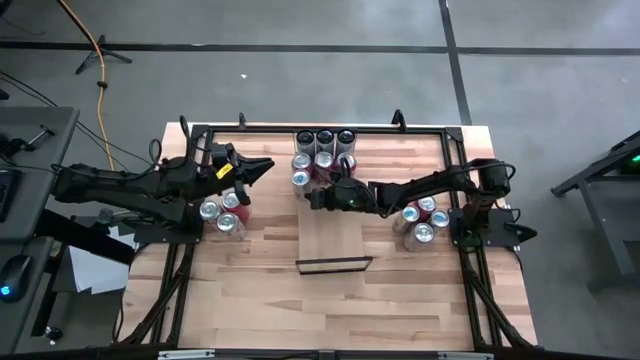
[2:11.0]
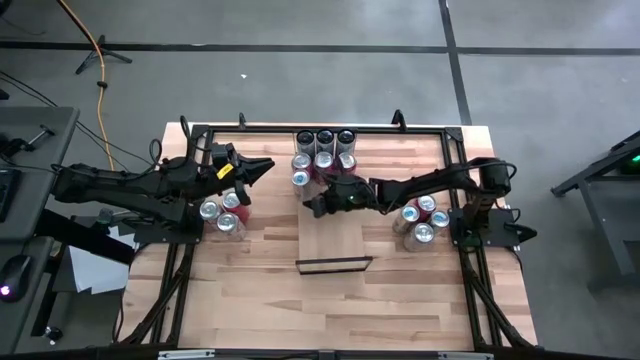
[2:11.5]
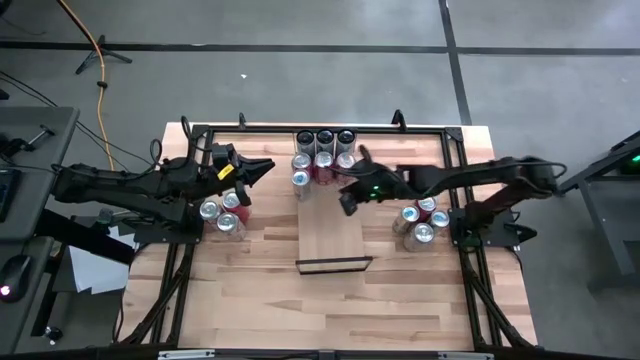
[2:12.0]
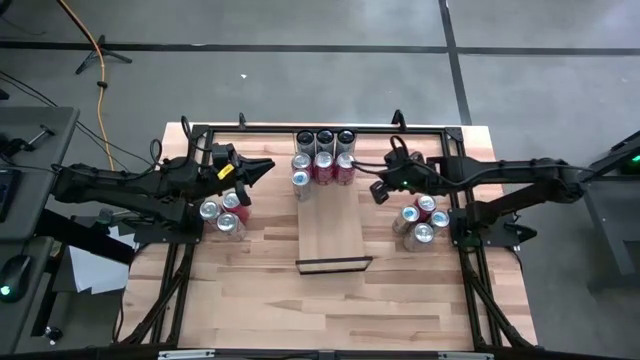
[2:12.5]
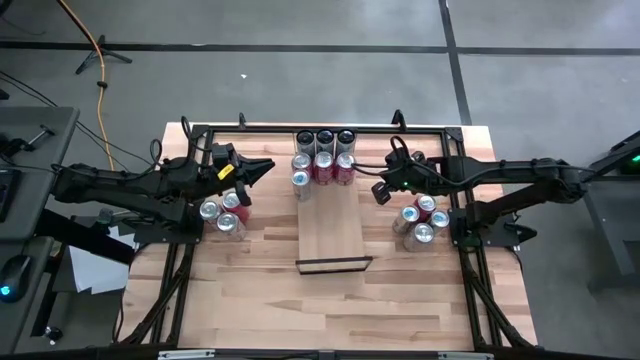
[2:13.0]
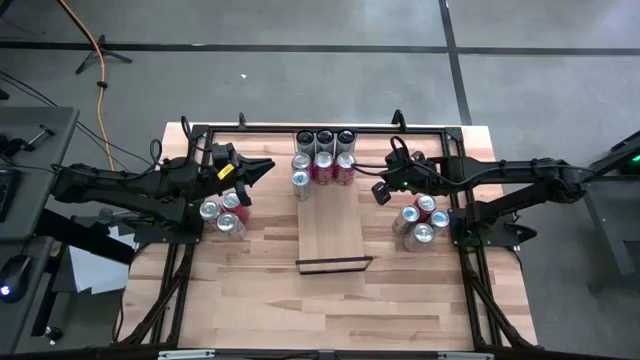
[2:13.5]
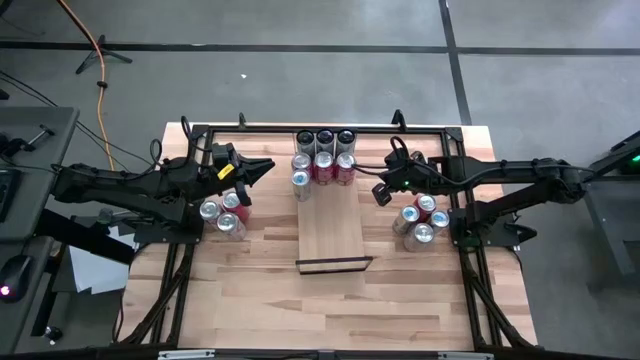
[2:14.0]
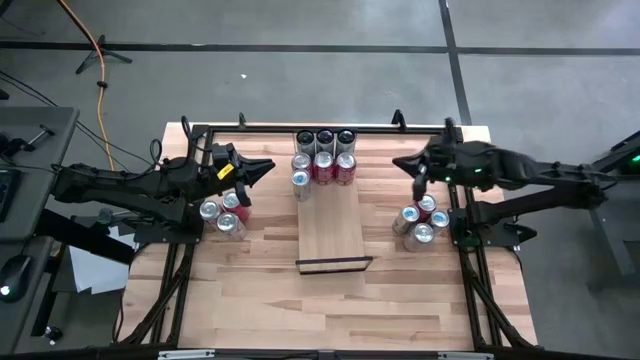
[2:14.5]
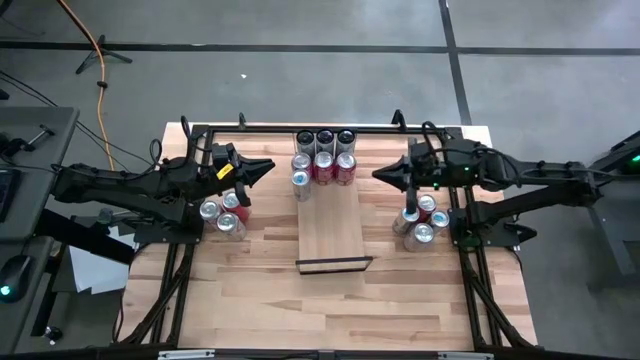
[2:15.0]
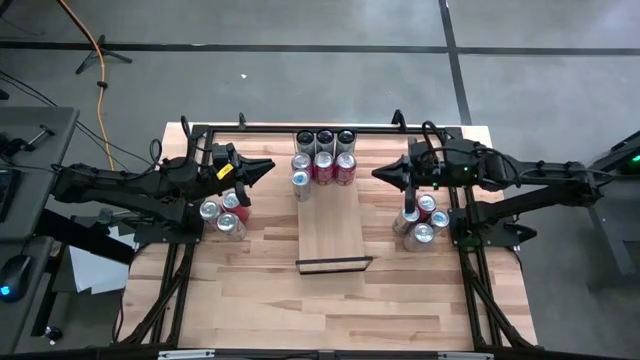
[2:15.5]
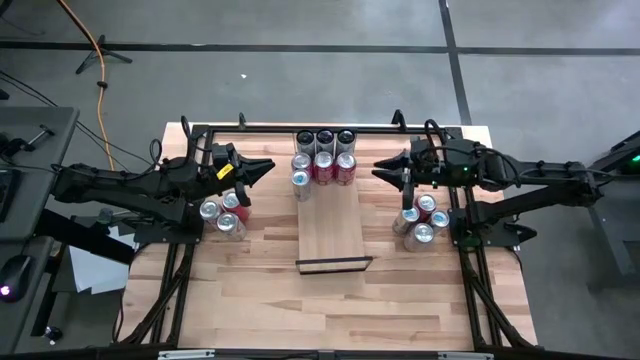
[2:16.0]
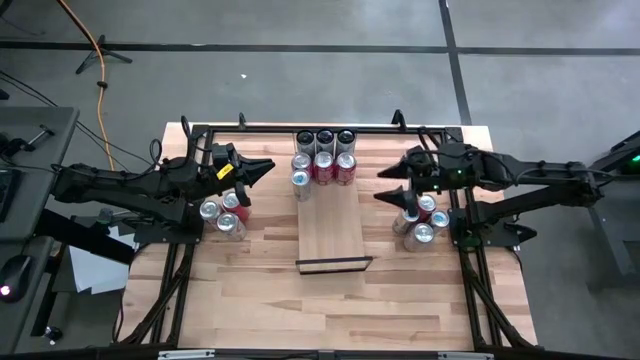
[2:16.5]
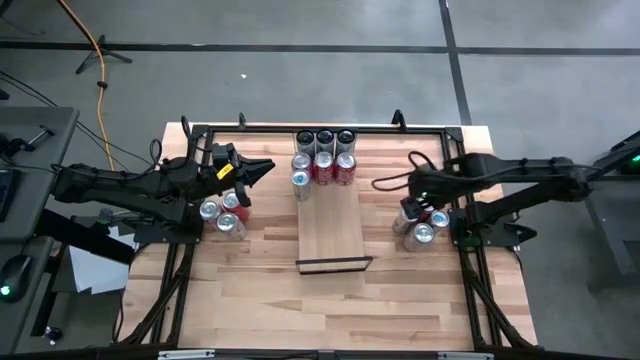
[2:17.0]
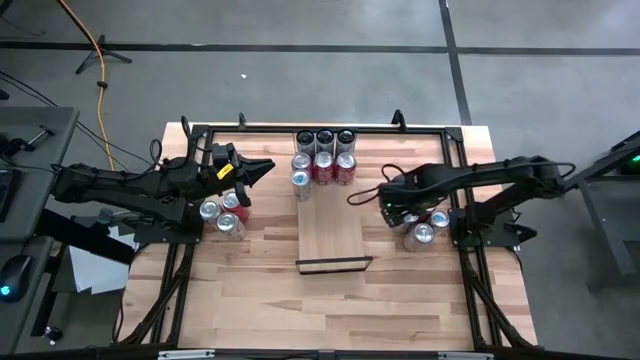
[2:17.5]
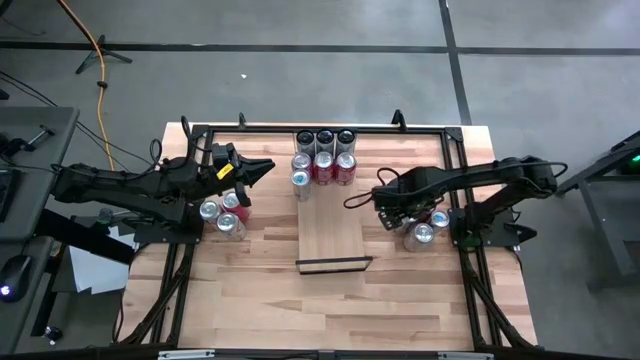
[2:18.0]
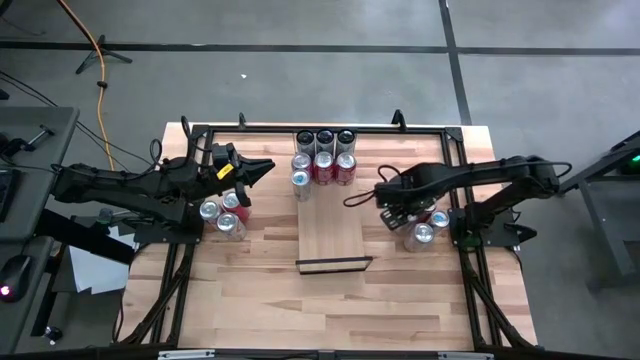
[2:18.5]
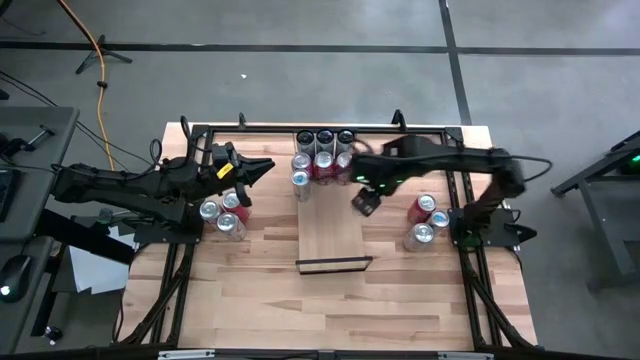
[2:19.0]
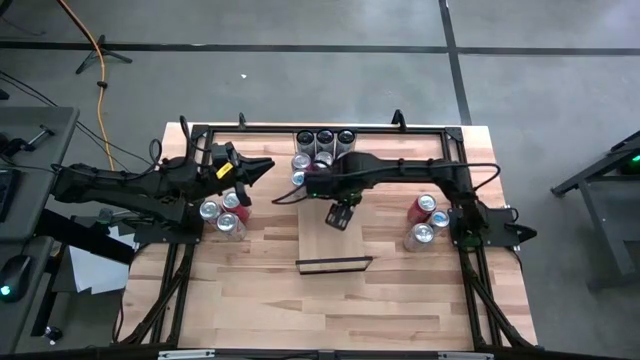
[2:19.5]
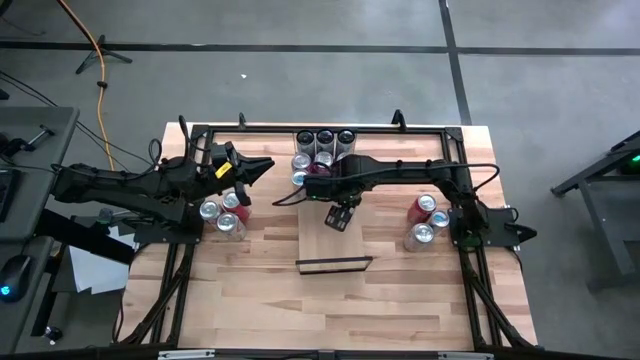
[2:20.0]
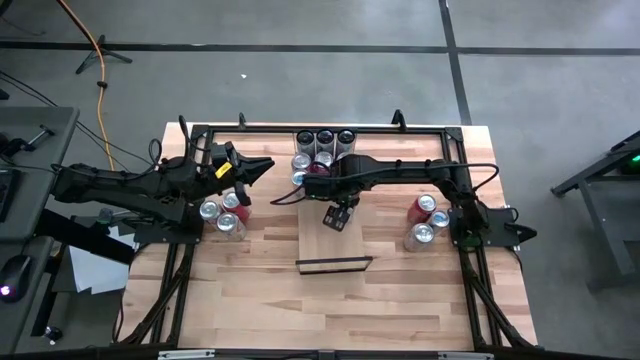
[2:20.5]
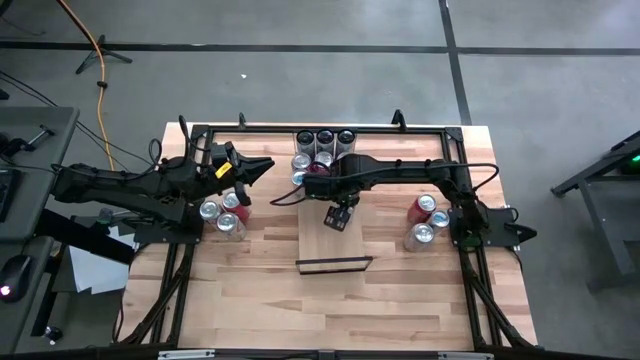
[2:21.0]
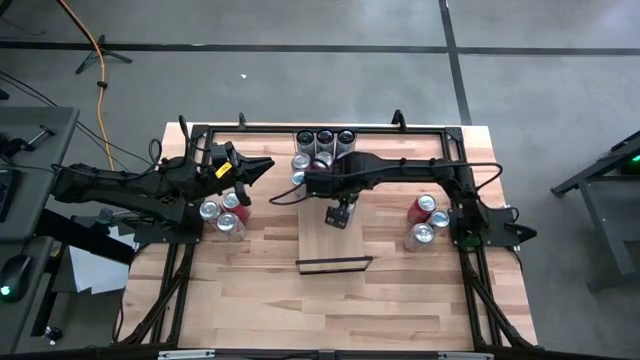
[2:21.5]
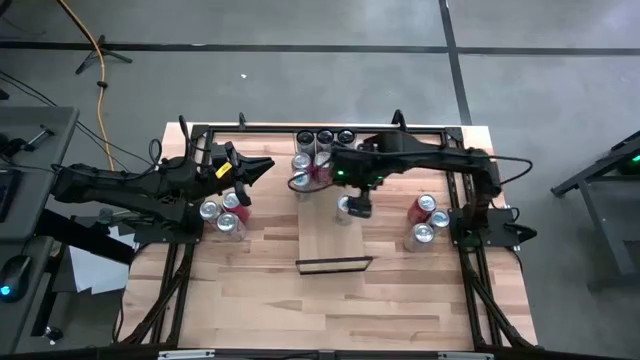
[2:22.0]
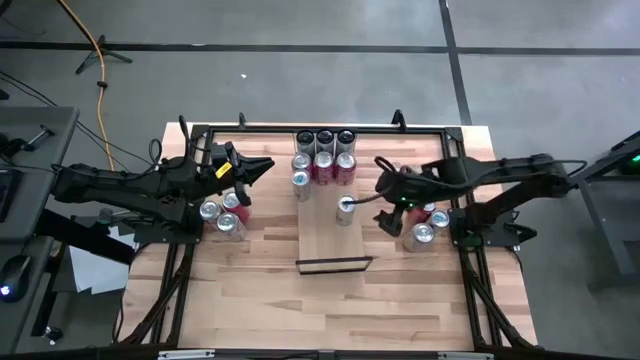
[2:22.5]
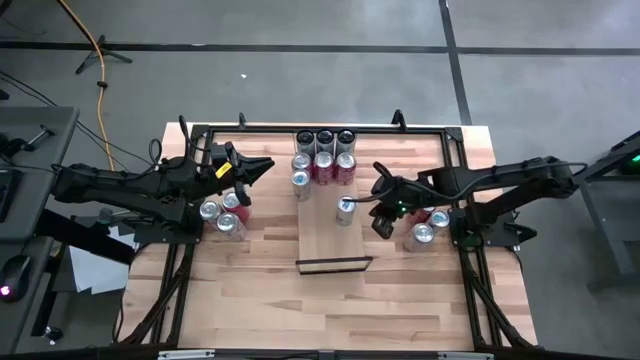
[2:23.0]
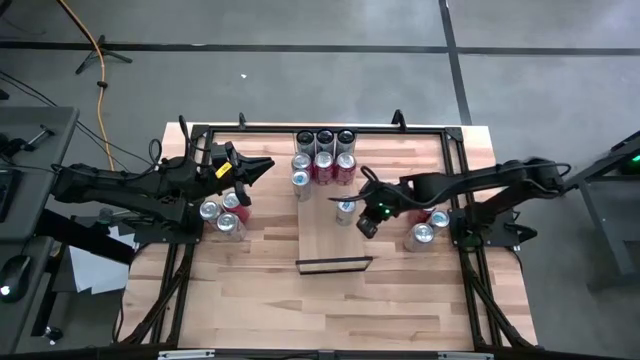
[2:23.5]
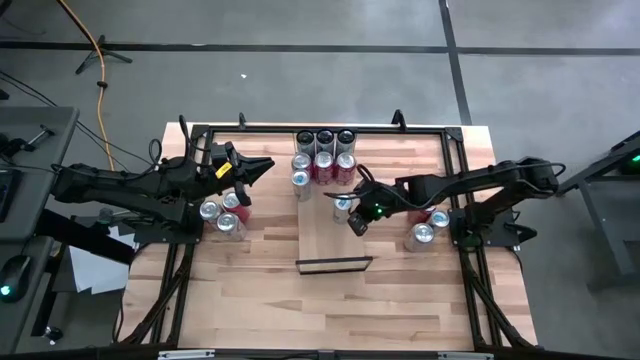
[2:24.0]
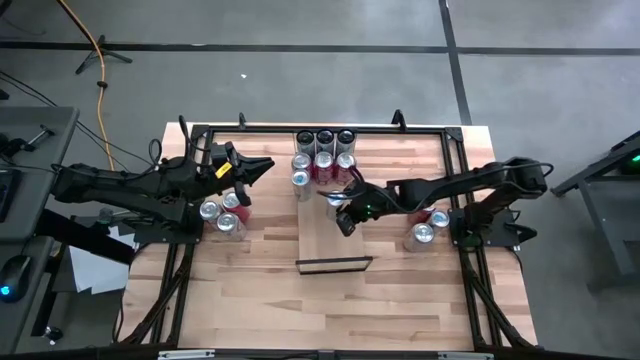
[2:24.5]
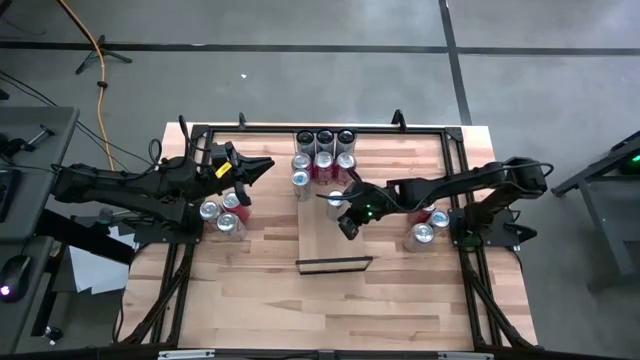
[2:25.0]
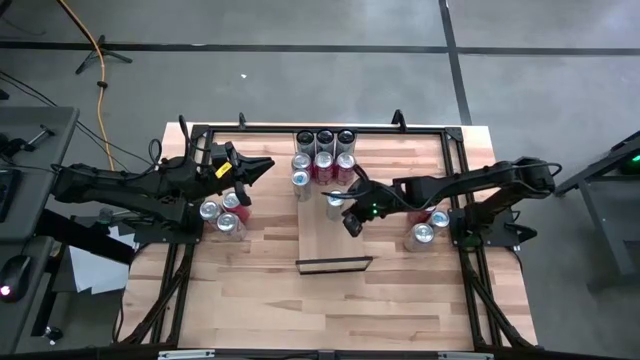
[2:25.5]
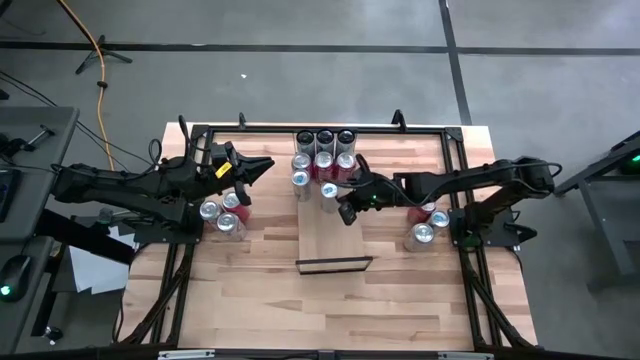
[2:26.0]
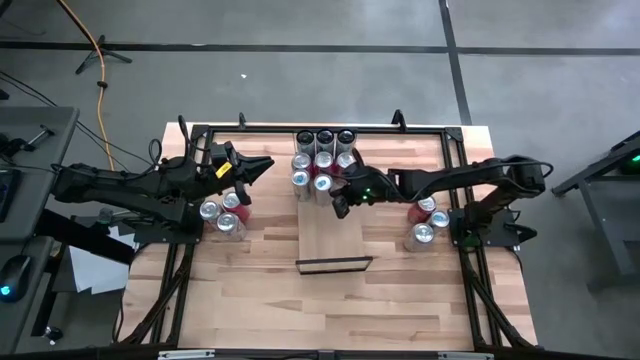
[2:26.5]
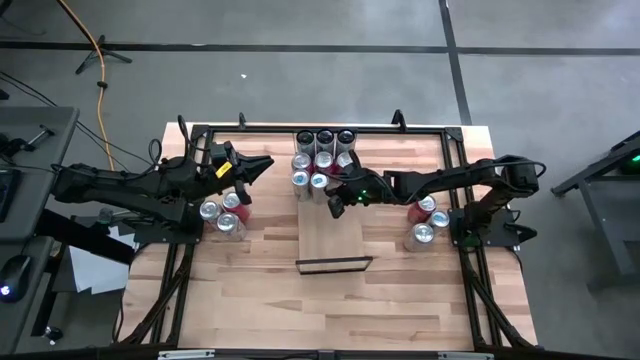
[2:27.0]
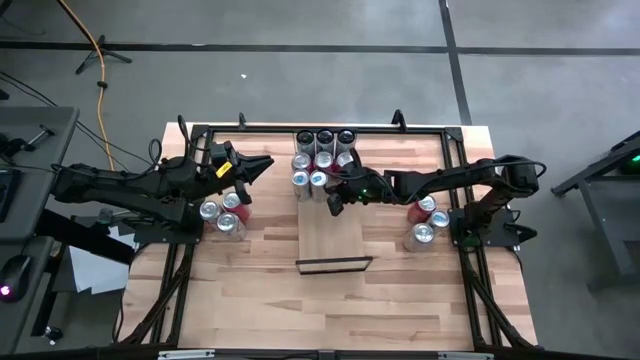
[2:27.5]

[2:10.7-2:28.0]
Task: Place canned beverage on shelf
Put the left blue soda can on the shelf aligned with the other blue soda cans

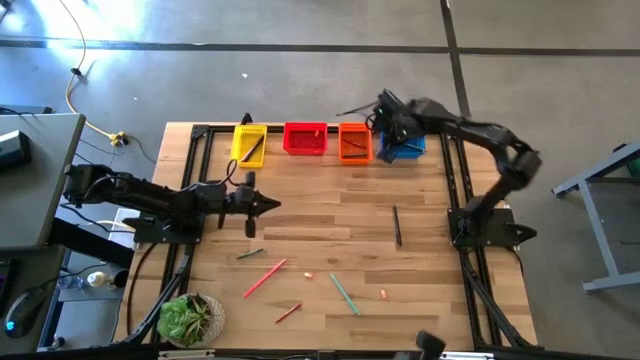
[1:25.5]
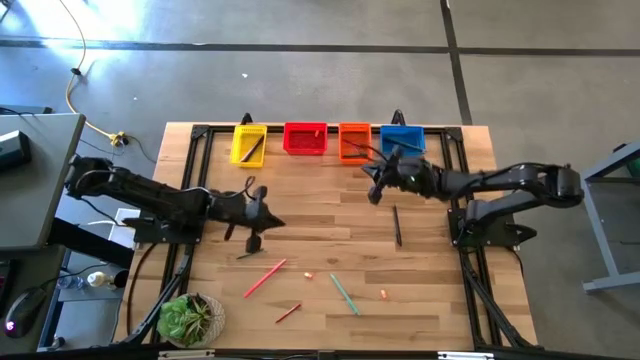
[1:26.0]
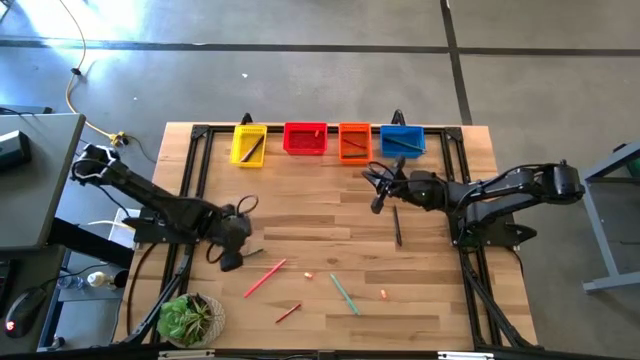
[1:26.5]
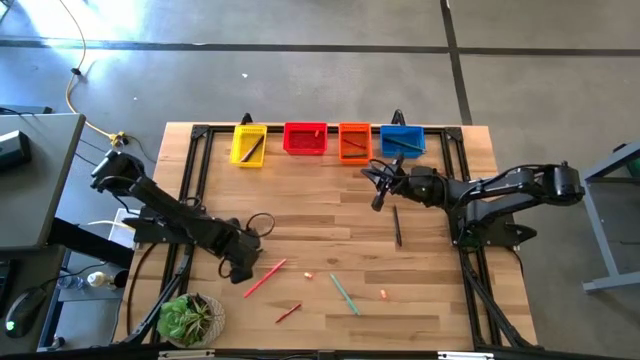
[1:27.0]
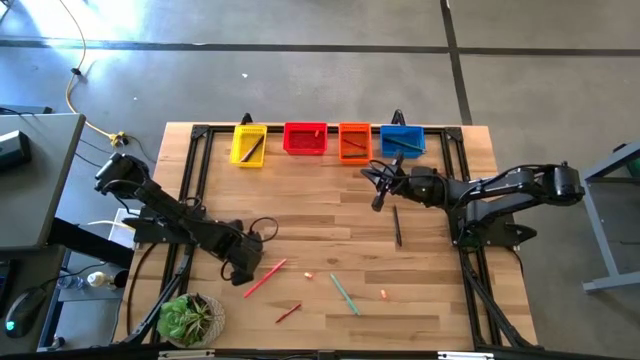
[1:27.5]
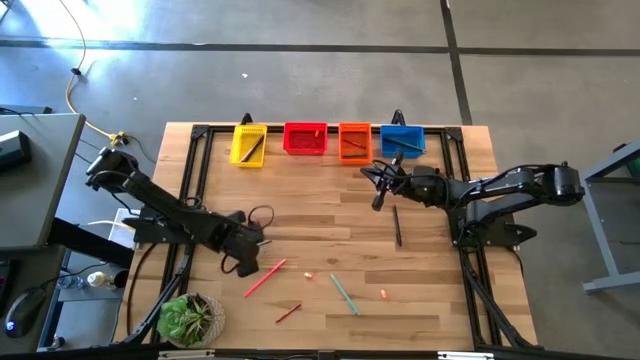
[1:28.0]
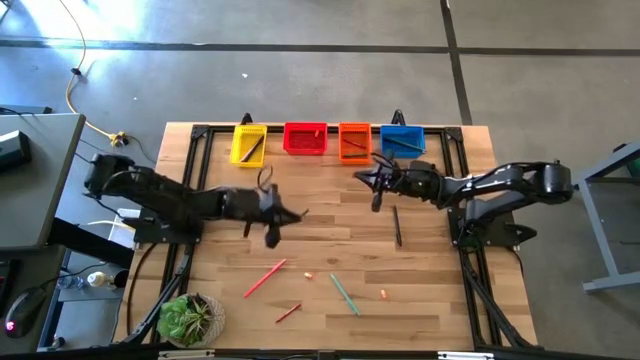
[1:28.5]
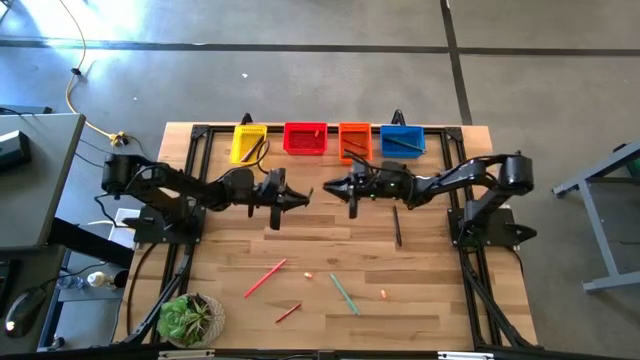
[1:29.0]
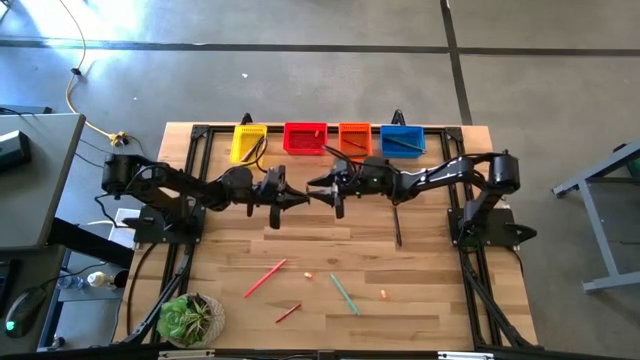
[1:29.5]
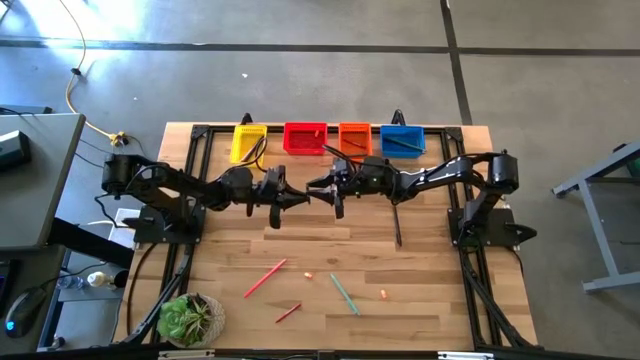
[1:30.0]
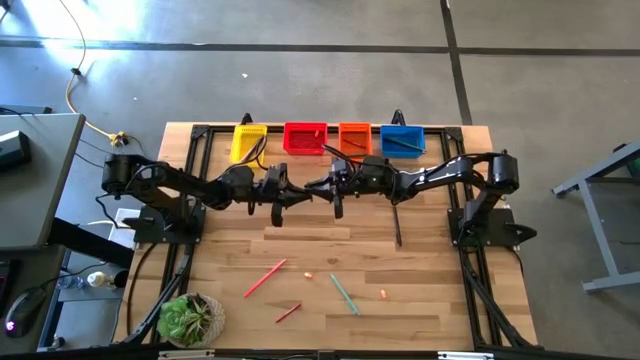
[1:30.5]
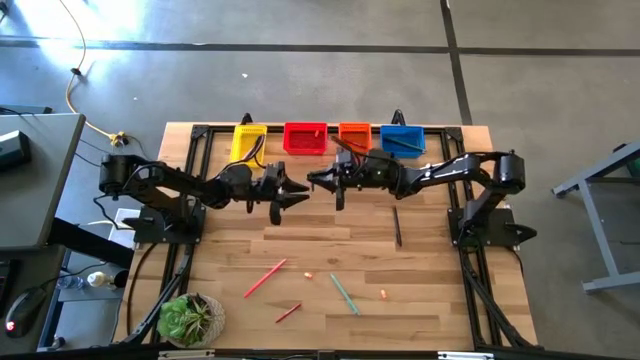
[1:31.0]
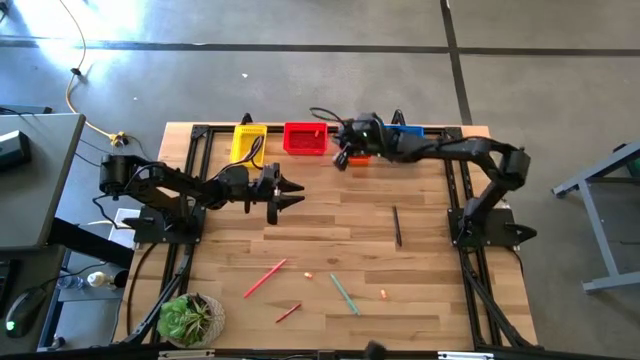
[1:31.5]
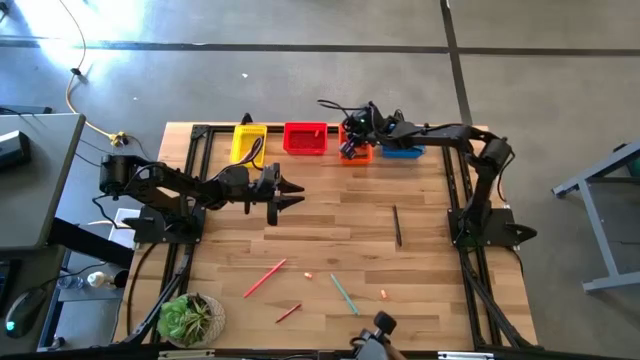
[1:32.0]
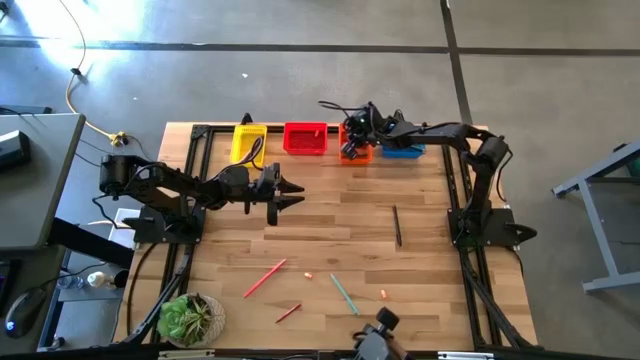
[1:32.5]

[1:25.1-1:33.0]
Task: Sort crayons/erasers/pens/pencils in bins
Put the green crayon into the orange basket
